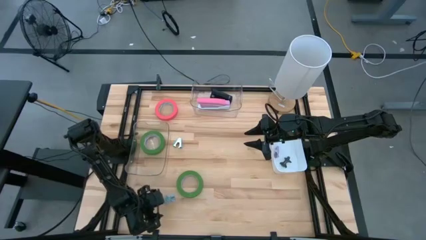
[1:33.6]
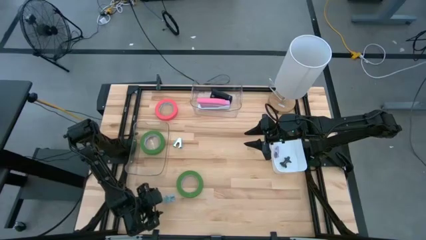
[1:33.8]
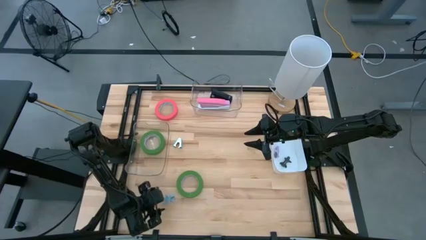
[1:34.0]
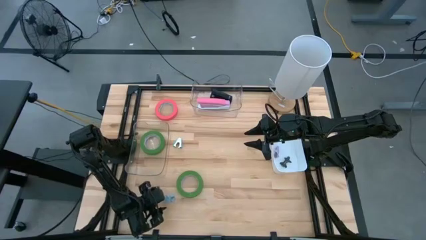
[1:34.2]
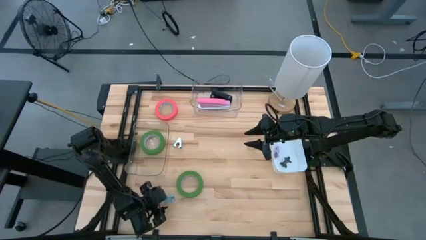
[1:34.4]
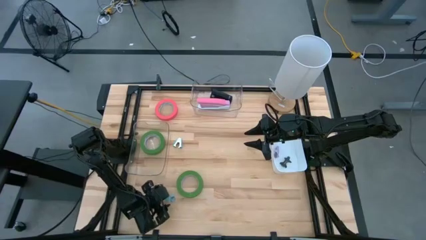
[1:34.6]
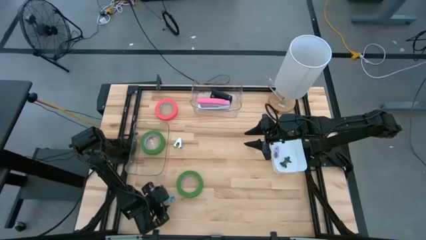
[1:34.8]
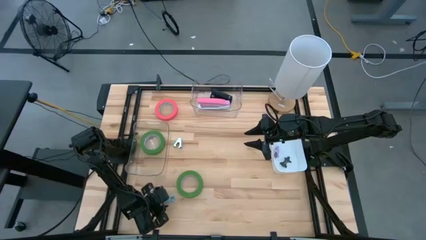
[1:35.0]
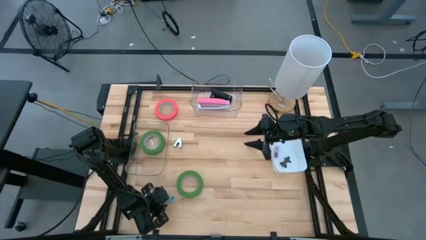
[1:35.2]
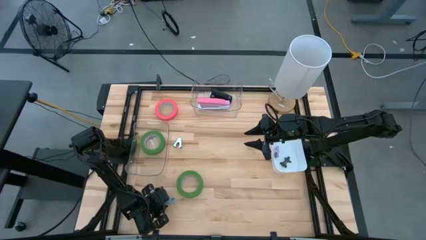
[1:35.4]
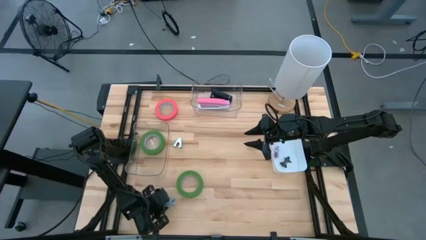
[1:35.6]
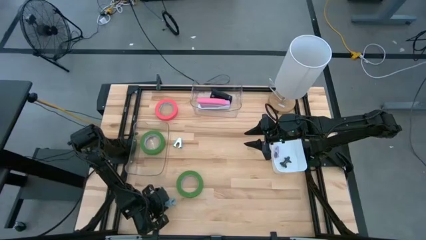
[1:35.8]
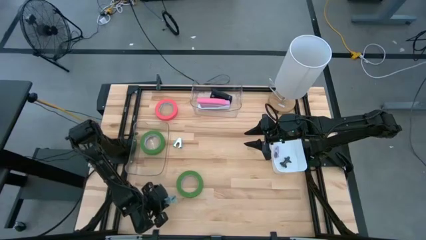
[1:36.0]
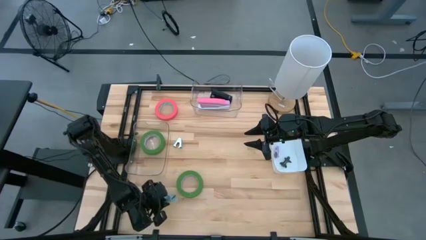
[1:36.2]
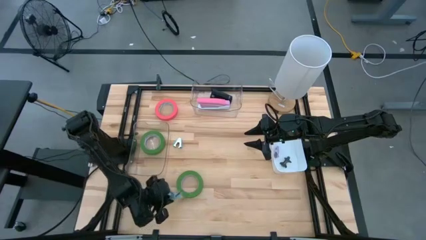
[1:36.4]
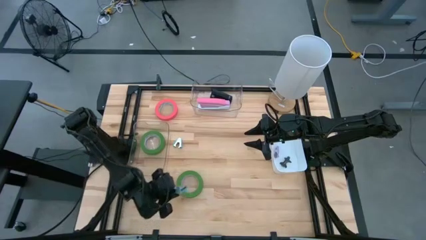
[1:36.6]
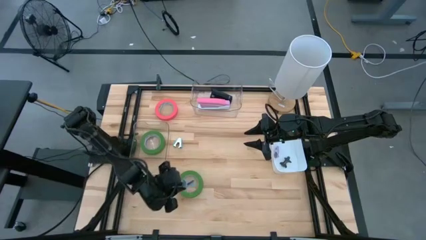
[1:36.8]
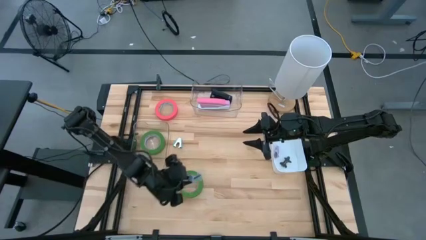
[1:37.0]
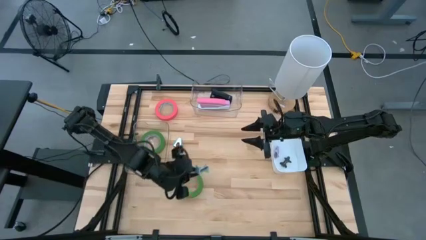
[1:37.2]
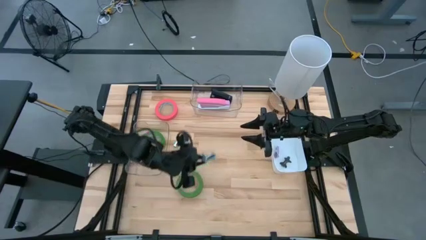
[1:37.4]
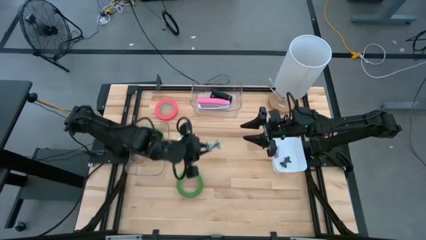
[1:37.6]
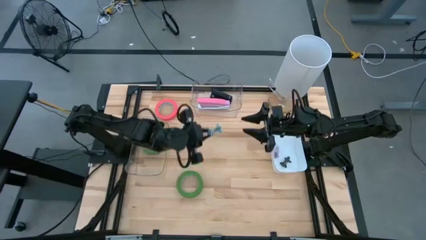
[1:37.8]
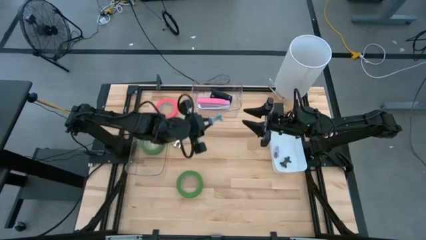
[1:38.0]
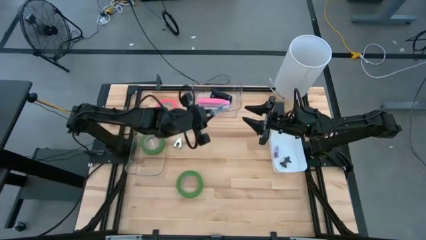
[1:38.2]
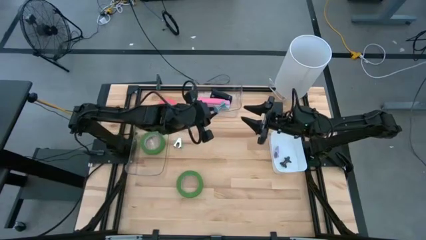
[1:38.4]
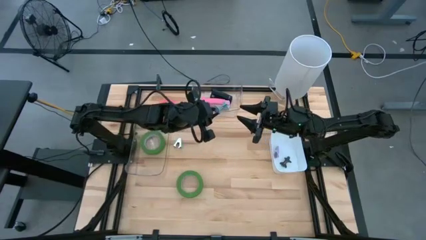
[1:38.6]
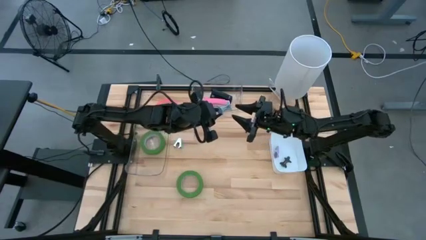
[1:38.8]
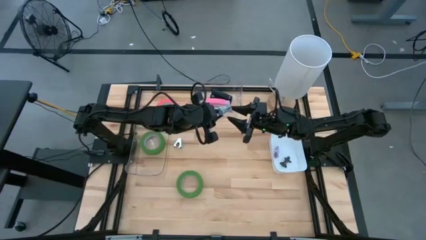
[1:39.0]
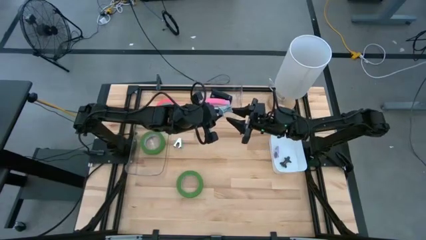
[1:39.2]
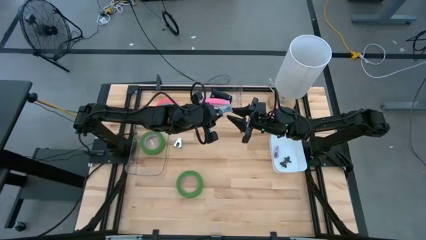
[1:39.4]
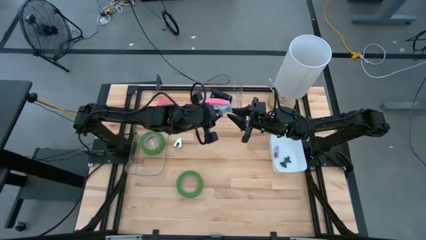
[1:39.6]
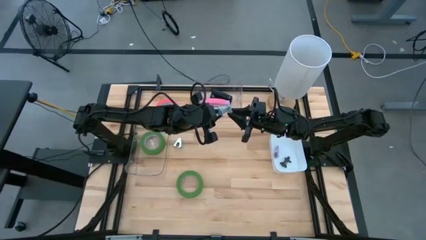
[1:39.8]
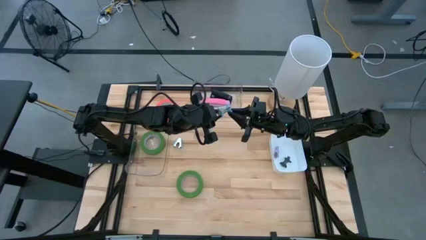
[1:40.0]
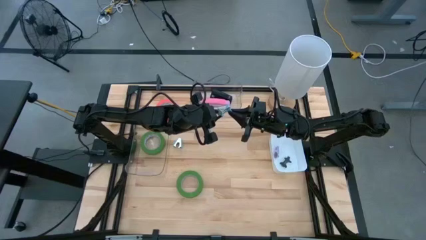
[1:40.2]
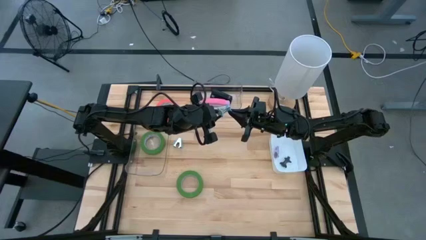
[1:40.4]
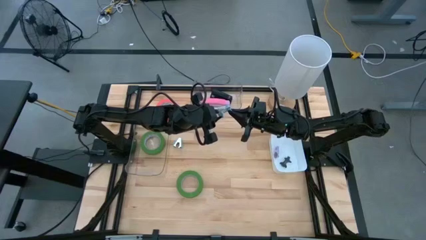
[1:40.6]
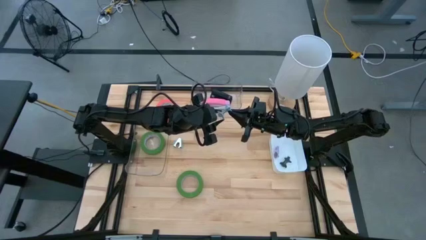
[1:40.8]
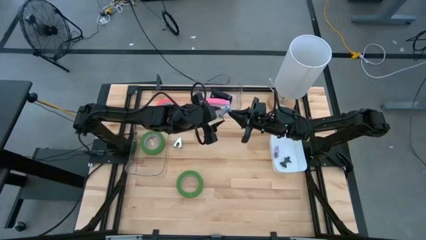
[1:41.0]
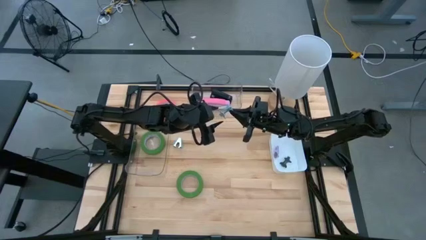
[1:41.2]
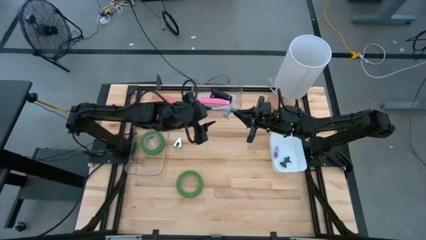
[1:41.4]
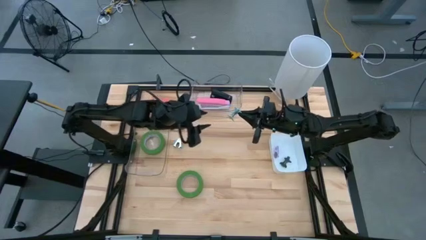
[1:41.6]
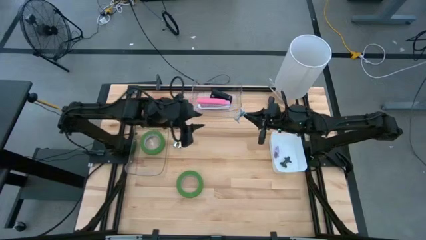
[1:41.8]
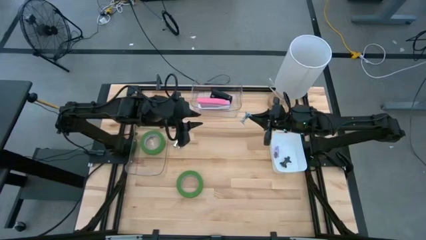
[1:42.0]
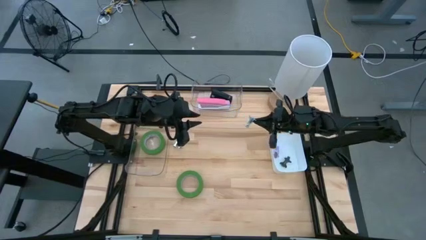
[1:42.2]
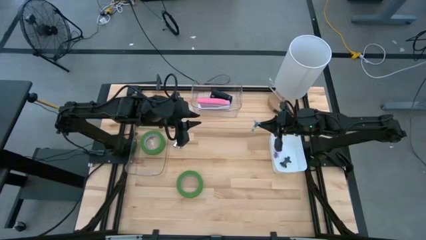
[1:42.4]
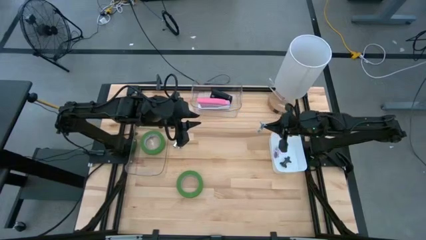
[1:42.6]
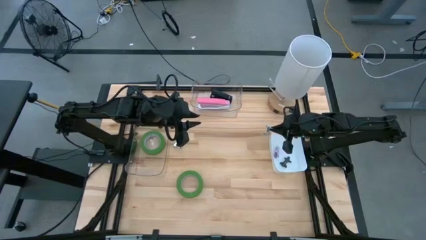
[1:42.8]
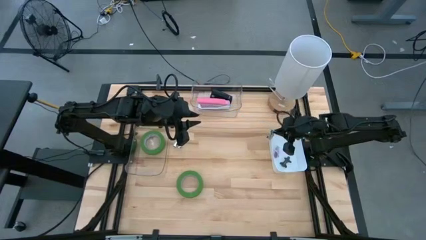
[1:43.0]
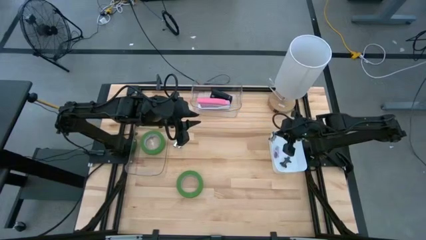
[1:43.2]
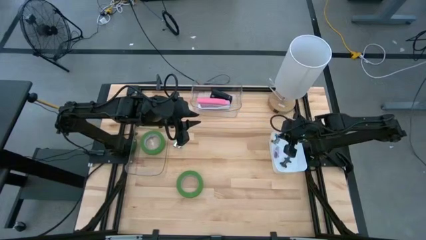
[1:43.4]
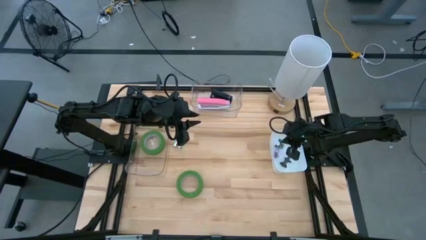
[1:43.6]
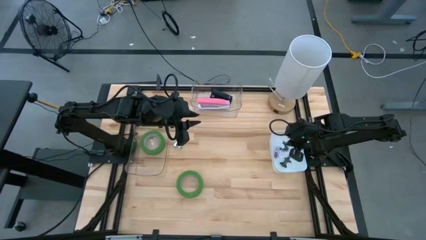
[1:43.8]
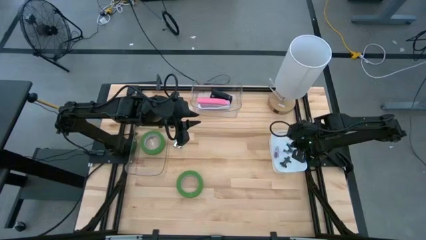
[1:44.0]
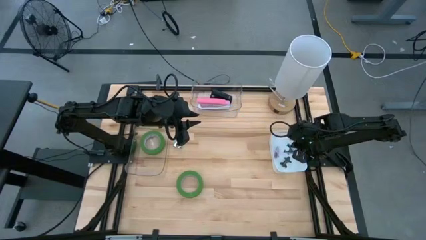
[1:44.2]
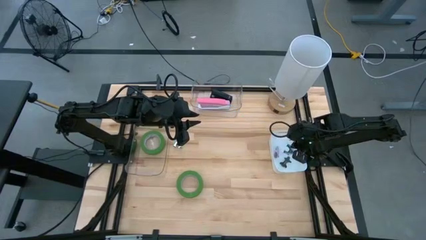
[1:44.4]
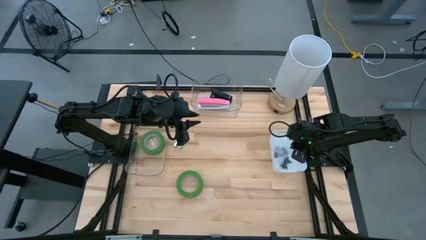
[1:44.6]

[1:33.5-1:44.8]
Task: Pick and place Stapler, Stapler remover, tape
Put the blue staple remover into the white bin

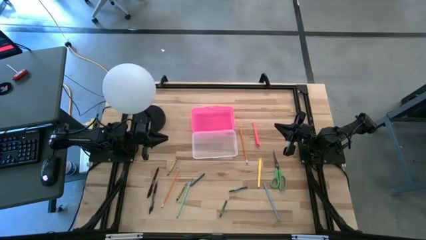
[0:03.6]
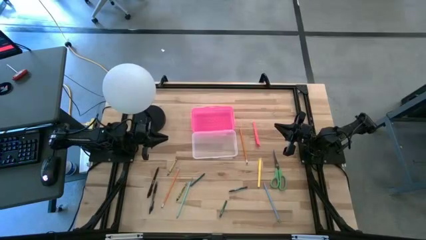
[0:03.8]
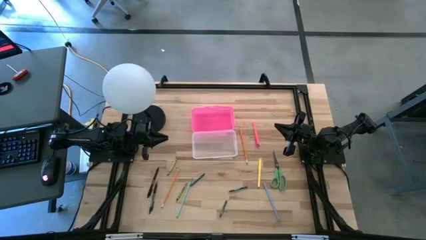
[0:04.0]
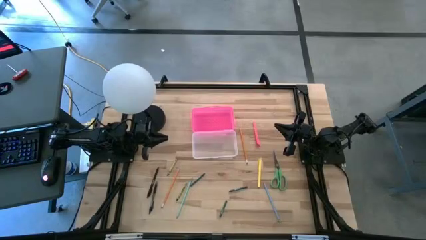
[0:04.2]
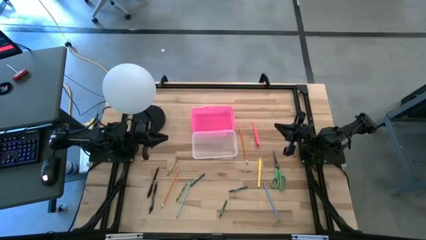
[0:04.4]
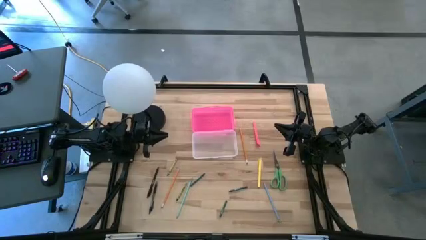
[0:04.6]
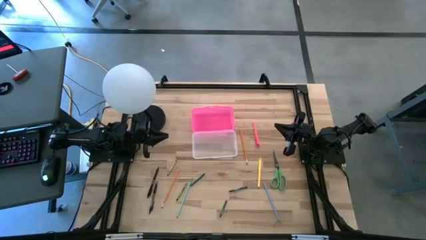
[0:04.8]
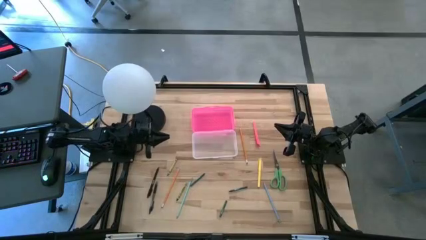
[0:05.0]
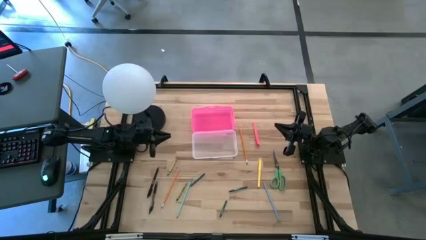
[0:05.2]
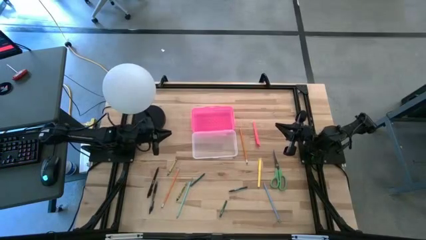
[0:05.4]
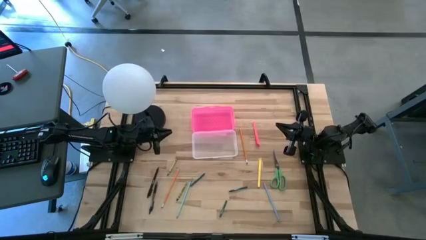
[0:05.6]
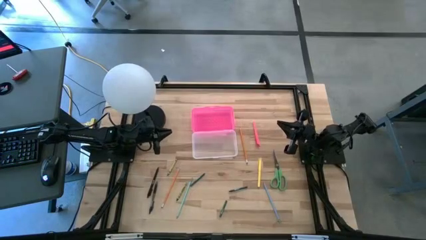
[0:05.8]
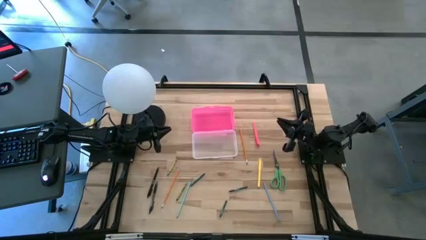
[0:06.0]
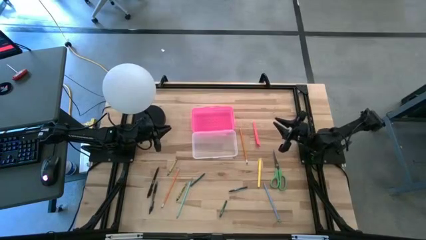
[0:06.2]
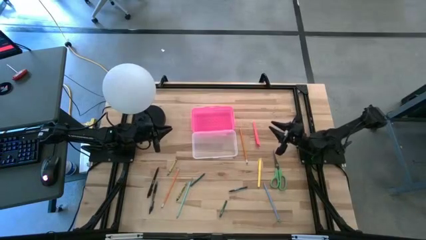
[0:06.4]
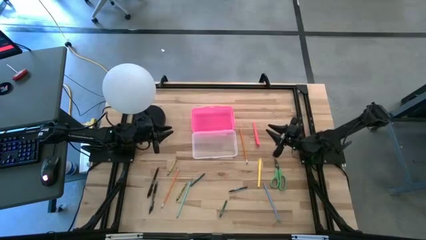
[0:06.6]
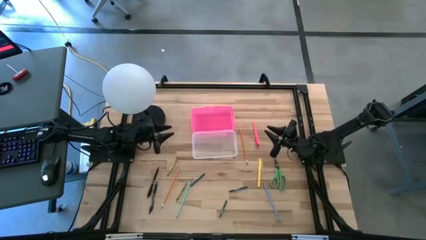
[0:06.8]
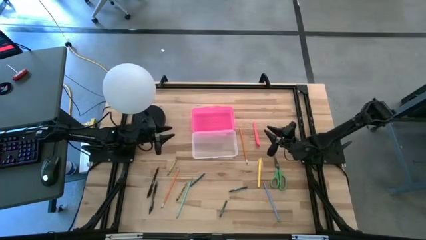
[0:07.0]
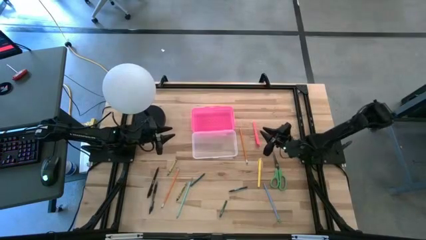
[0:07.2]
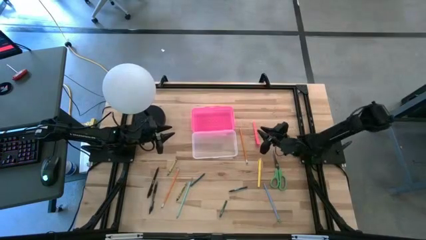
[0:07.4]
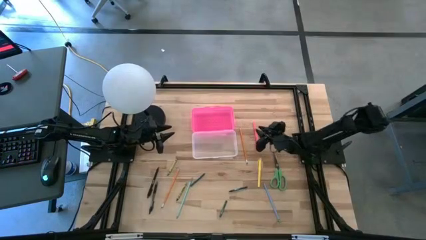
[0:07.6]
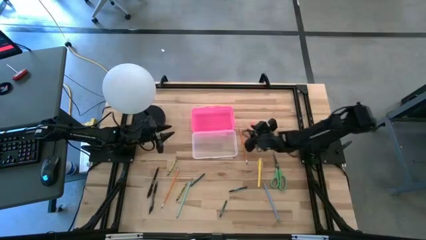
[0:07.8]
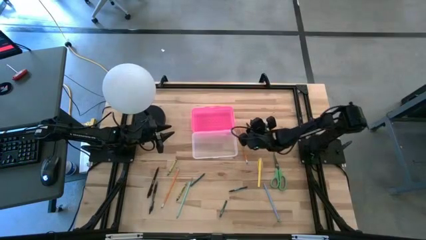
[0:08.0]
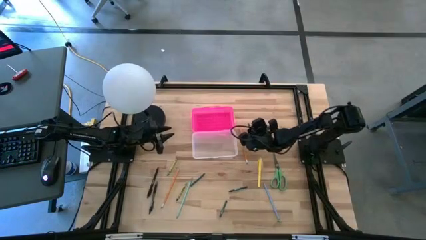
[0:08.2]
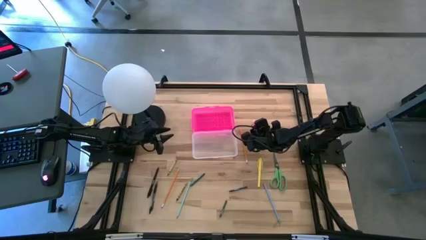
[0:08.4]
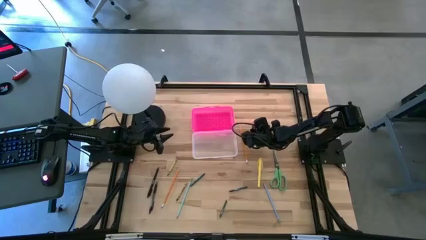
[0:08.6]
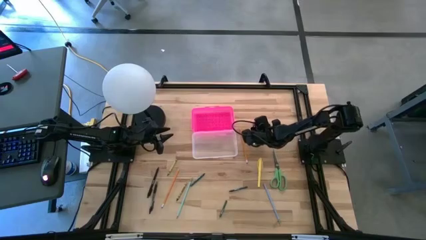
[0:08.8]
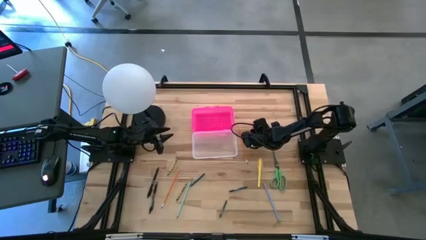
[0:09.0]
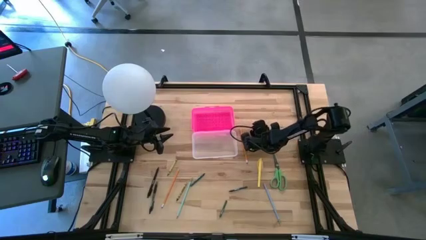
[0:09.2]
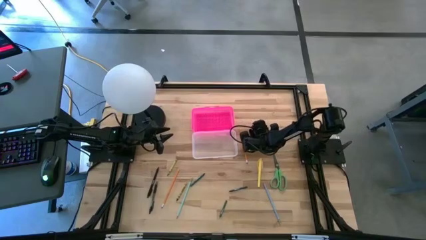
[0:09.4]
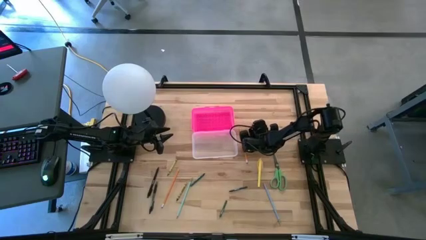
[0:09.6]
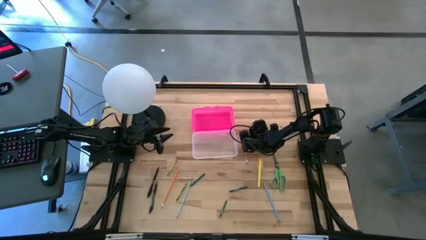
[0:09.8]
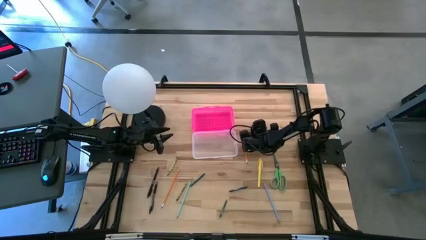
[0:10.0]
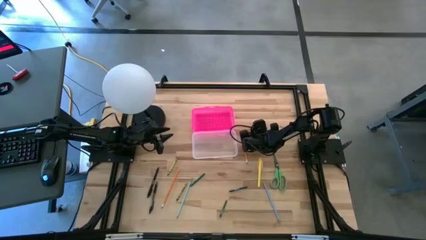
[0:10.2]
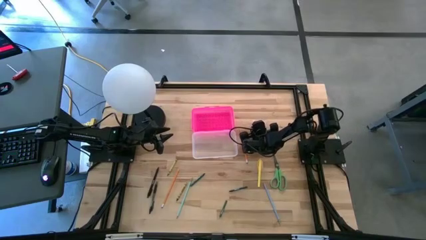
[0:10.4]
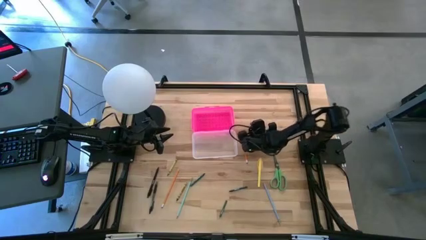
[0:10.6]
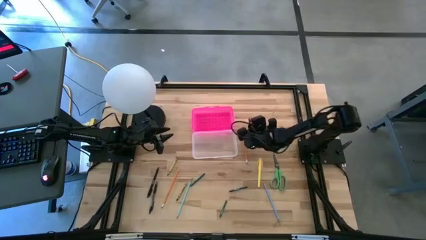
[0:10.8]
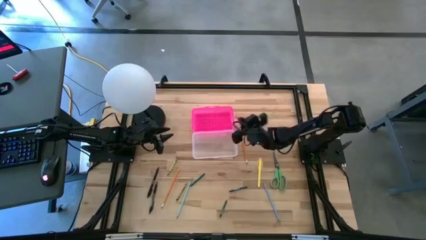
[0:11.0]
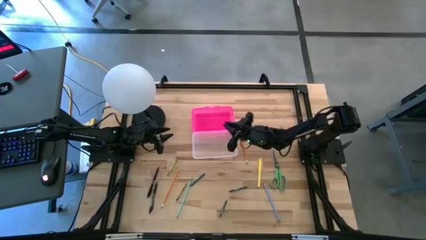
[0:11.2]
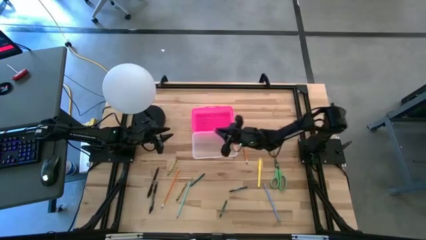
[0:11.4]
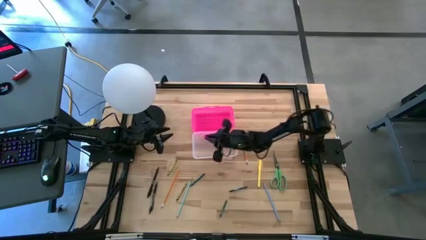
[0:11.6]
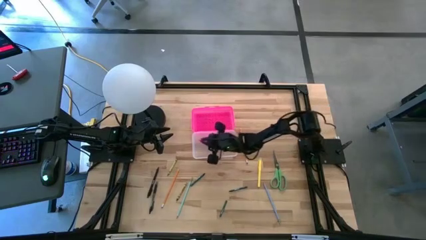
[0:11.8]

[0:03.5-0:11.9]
Task: Pick & place school supplies into a supply box
Put the pink pen into the pink supply box
